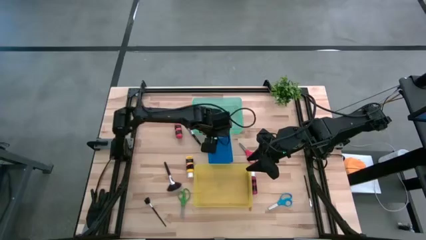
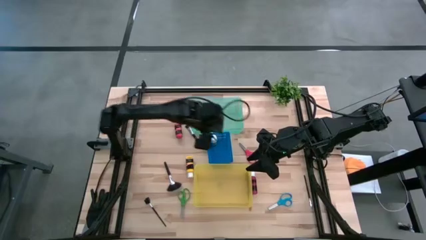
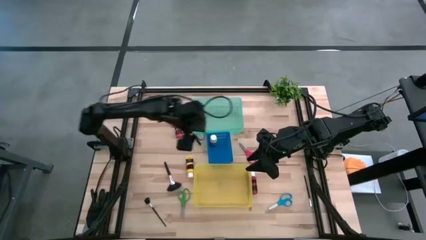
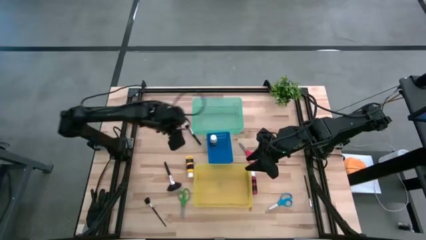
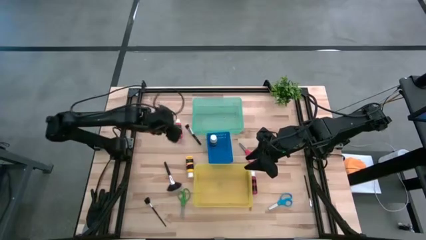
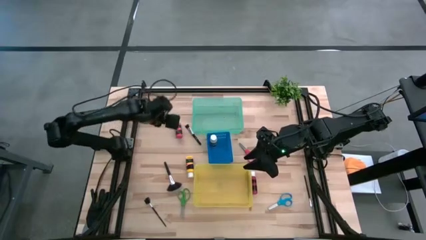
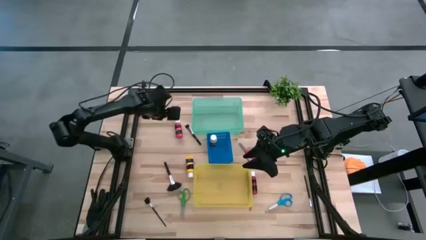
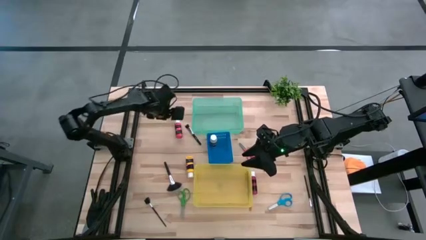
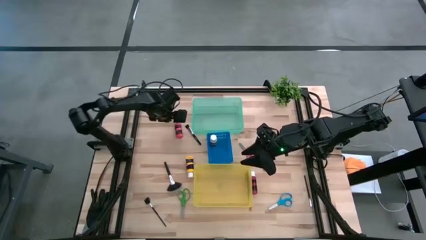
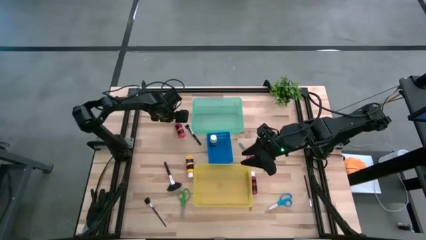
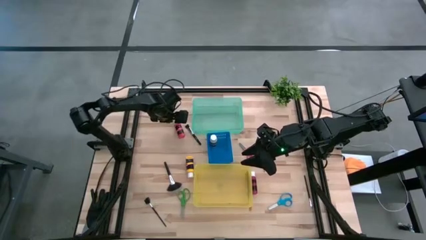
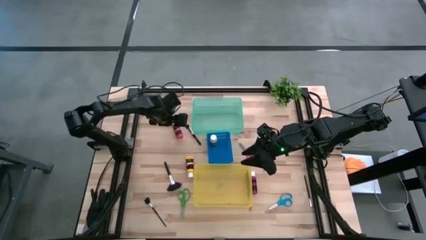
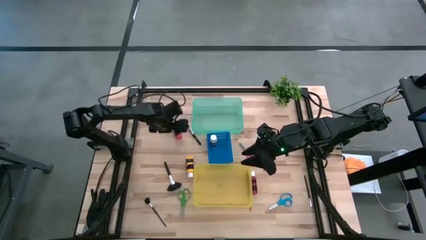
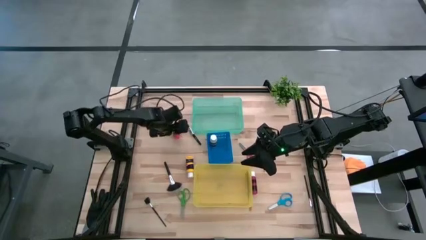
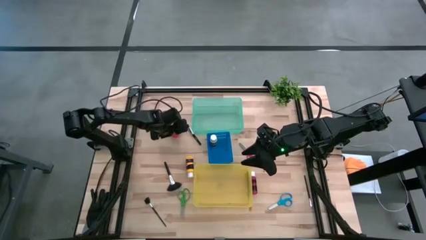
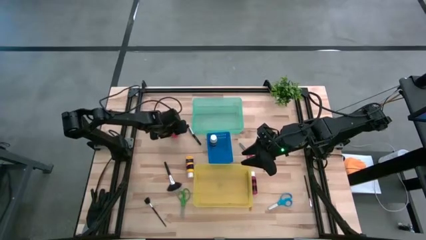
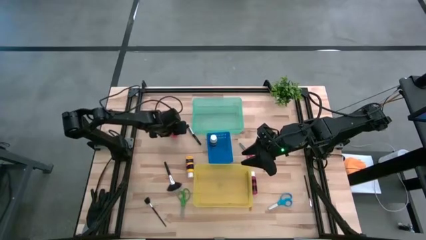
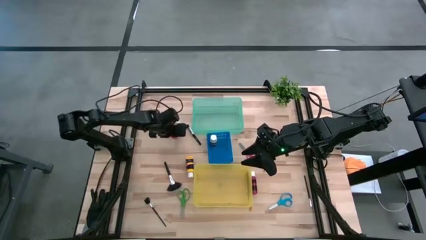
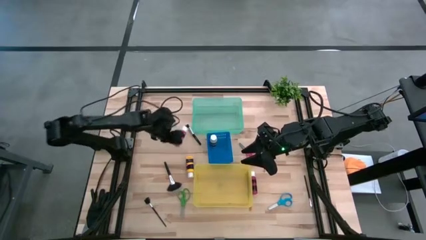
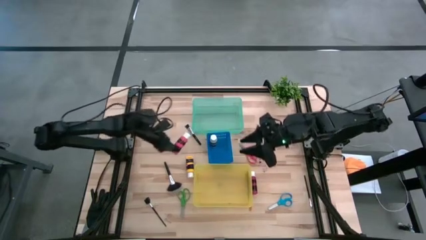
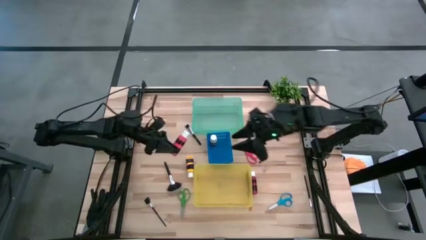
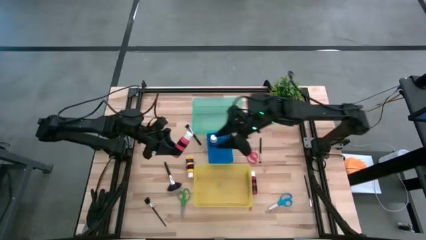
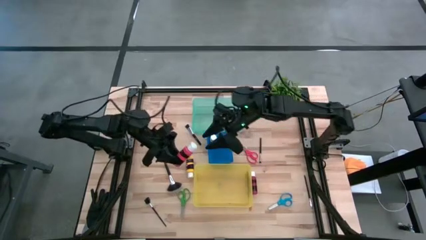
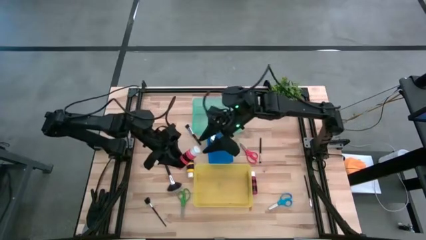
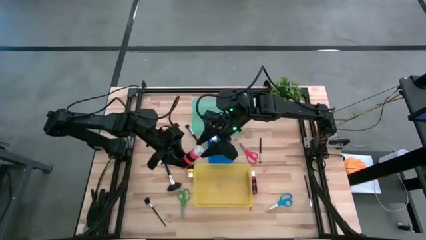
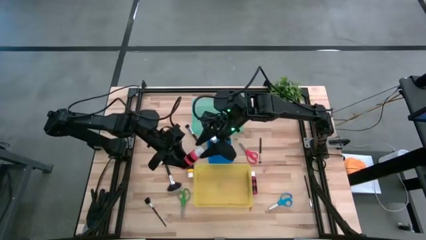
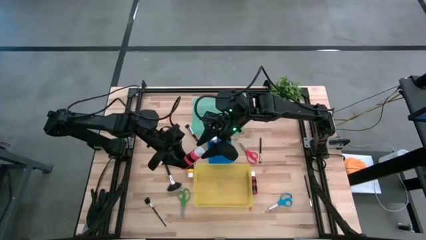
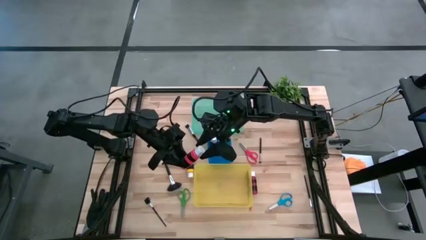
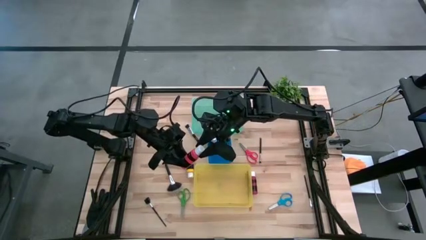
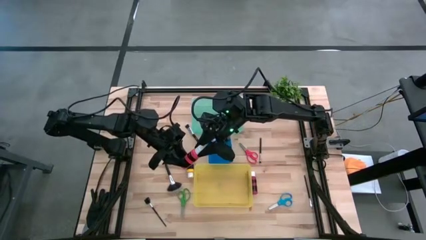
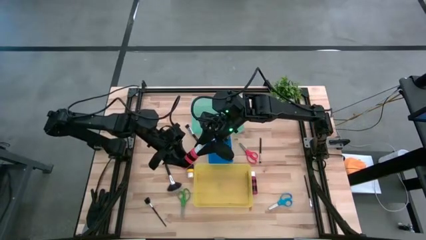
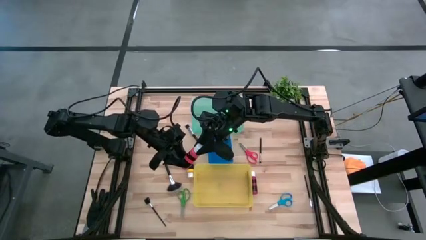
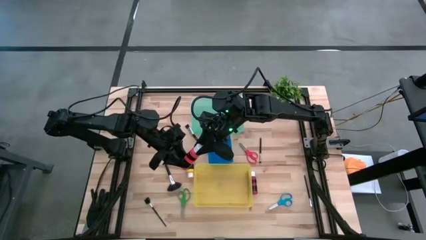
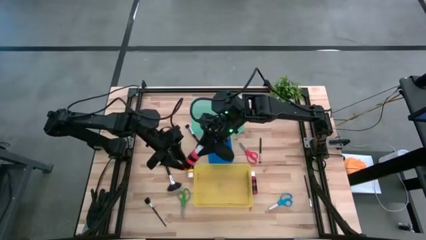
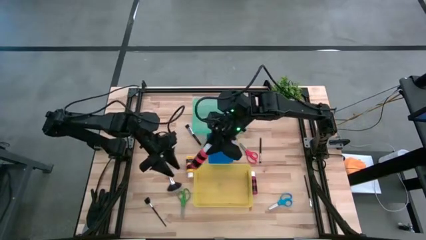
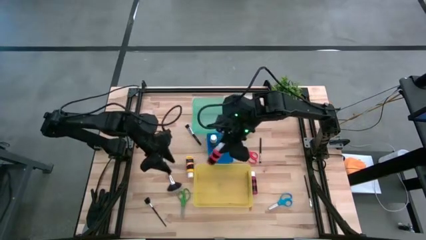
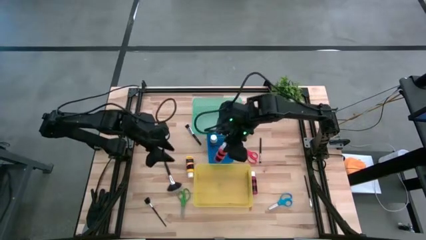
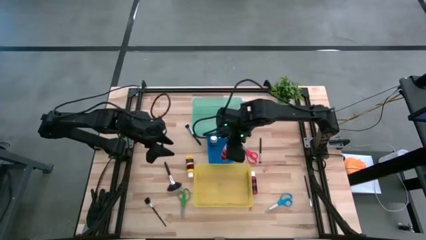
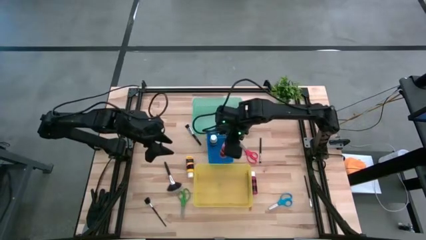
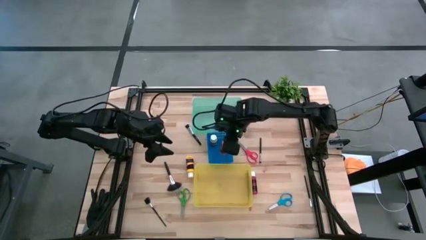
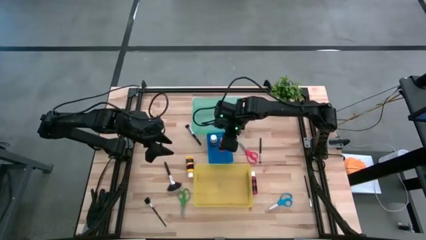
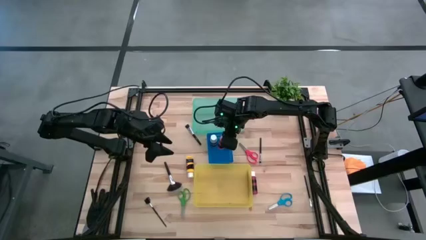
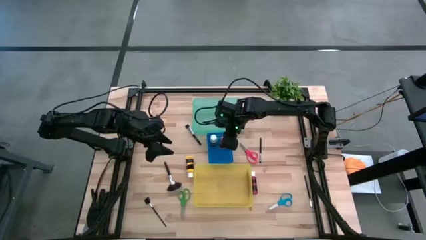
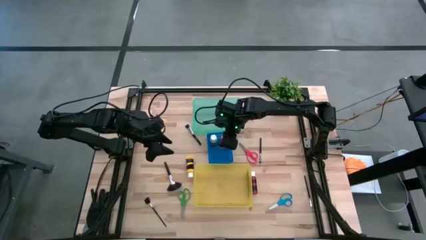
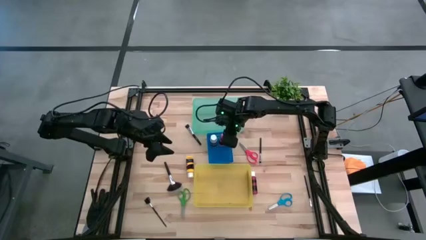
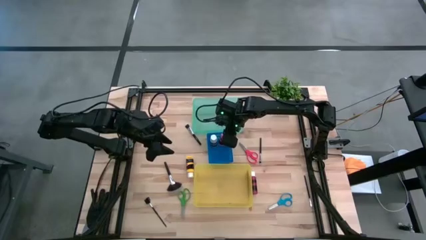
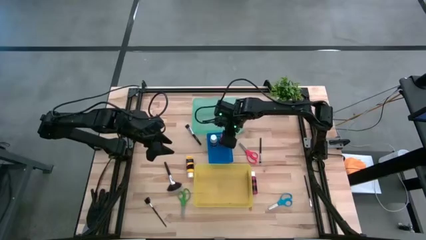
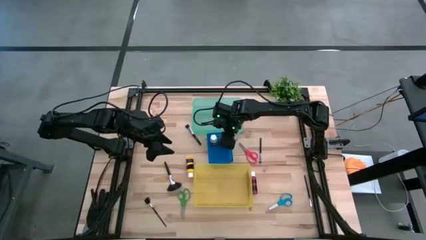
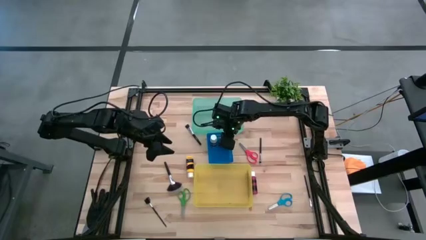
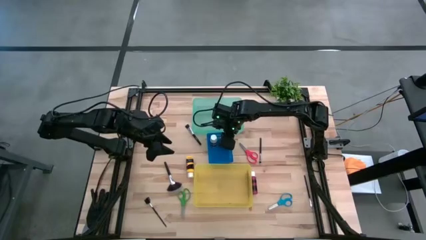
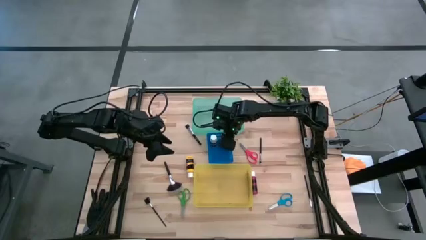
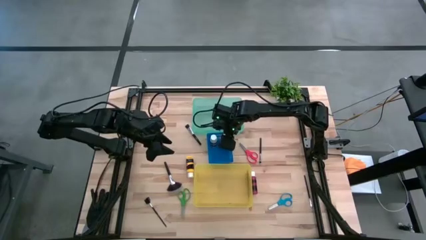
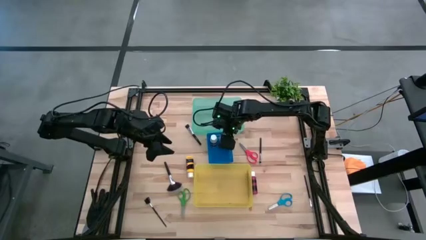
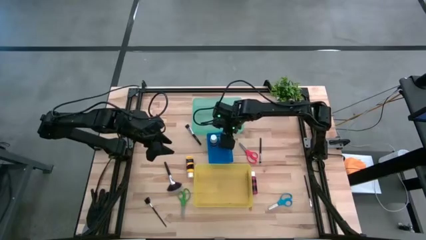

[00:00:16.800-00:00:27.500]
Task: Pick & Place Paint Supplies
Put the orange paint bottle into the blue bin
